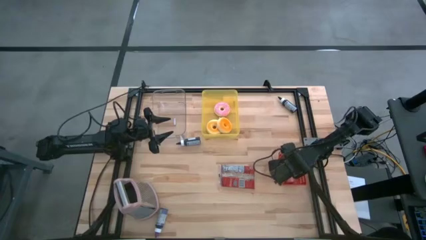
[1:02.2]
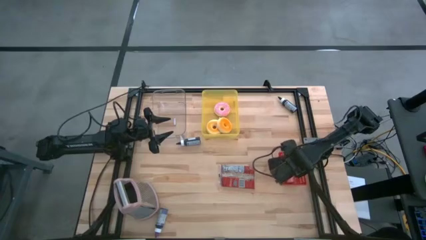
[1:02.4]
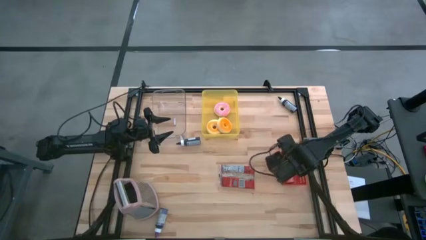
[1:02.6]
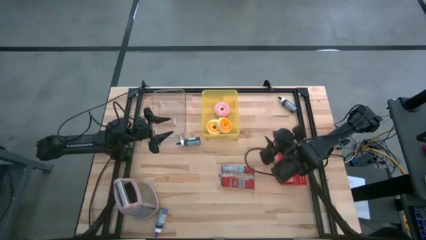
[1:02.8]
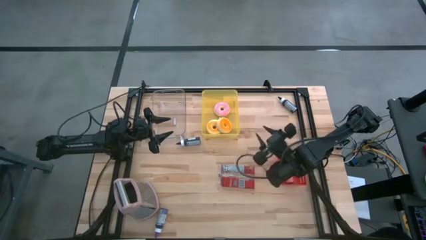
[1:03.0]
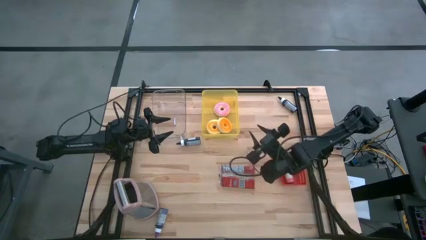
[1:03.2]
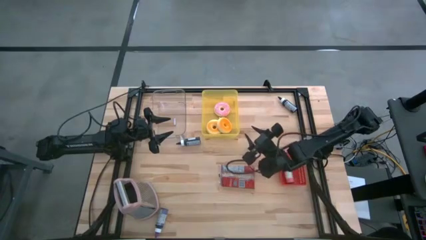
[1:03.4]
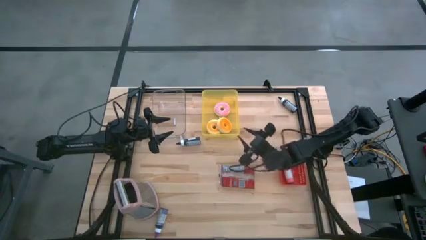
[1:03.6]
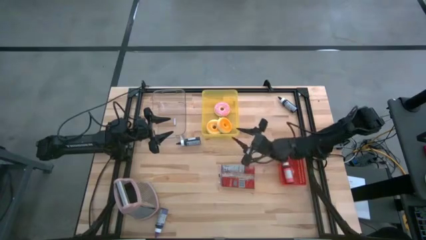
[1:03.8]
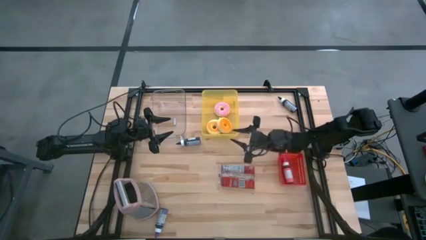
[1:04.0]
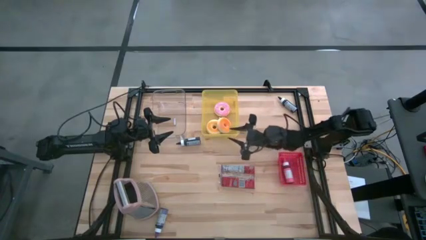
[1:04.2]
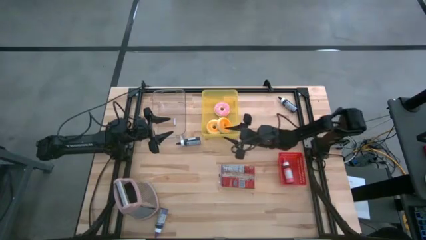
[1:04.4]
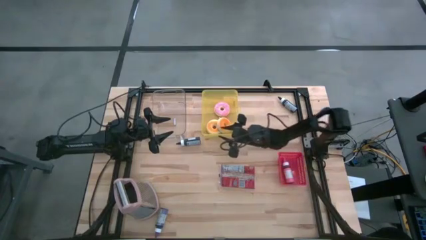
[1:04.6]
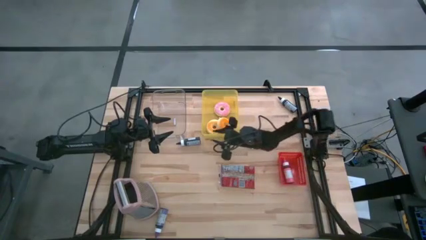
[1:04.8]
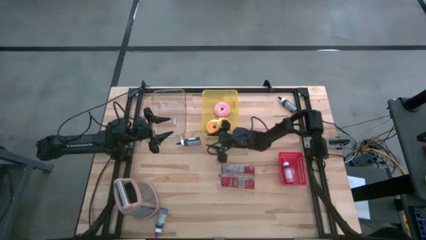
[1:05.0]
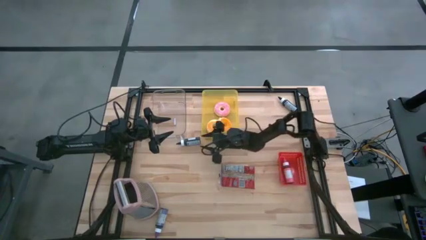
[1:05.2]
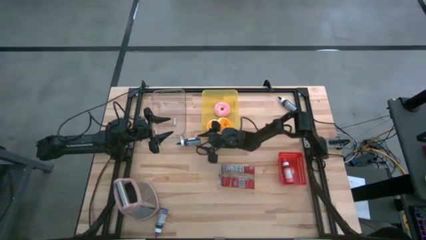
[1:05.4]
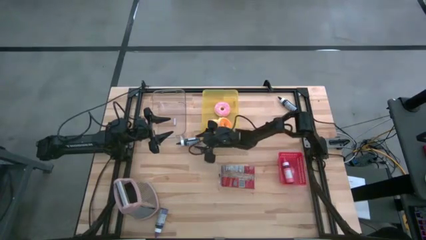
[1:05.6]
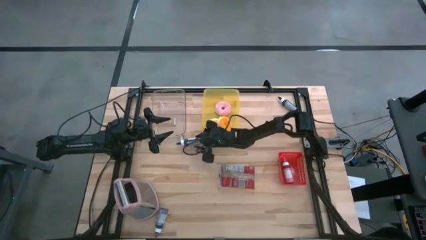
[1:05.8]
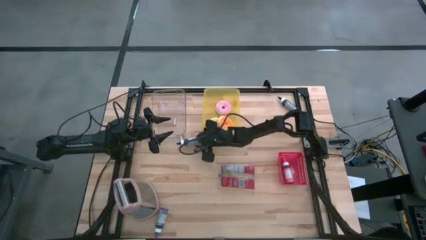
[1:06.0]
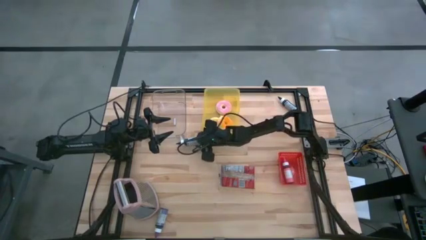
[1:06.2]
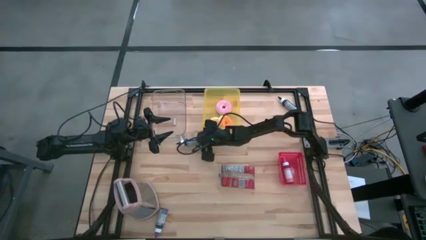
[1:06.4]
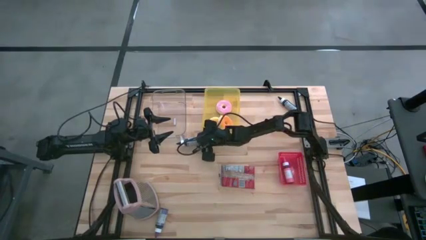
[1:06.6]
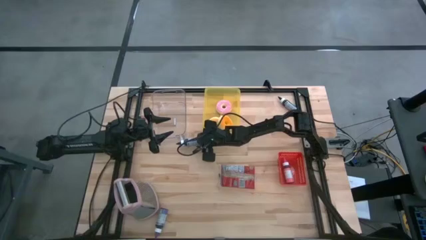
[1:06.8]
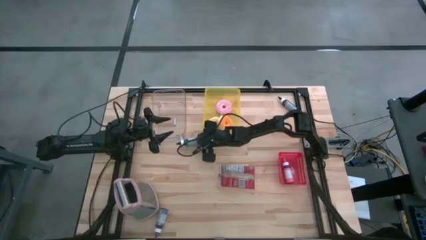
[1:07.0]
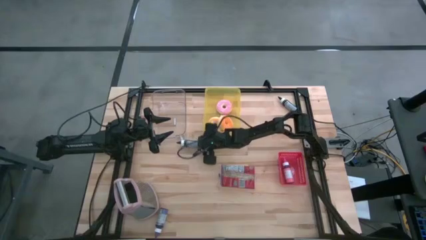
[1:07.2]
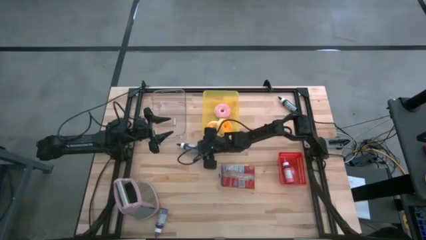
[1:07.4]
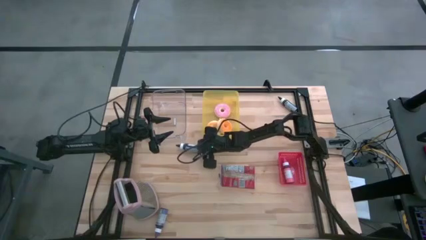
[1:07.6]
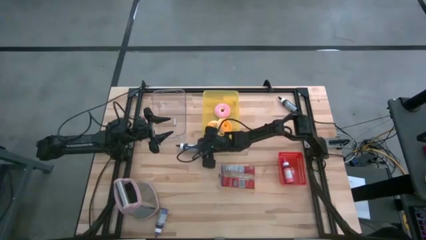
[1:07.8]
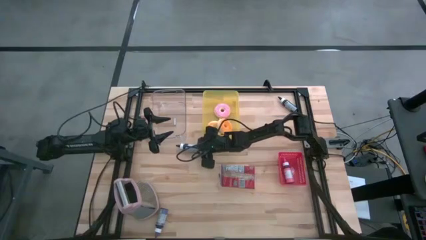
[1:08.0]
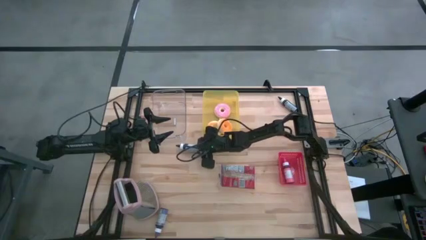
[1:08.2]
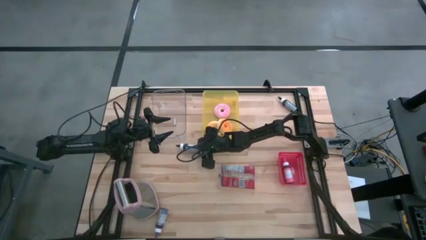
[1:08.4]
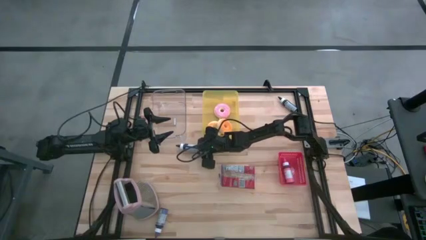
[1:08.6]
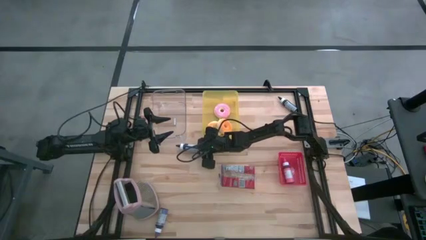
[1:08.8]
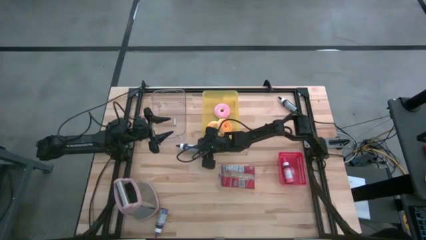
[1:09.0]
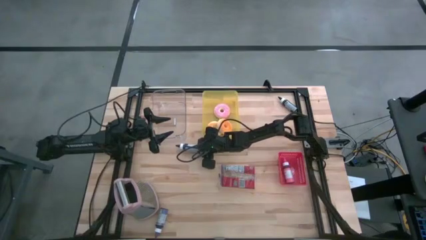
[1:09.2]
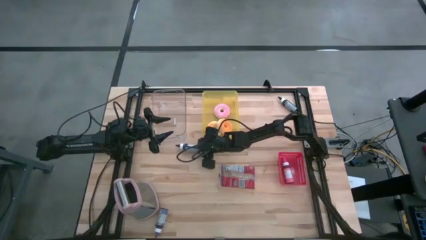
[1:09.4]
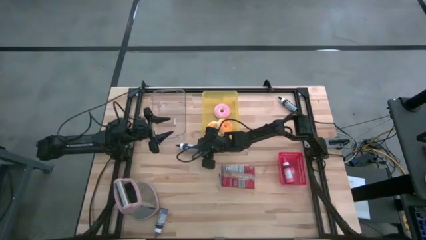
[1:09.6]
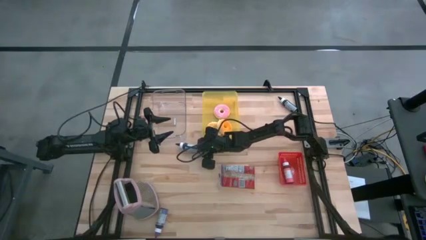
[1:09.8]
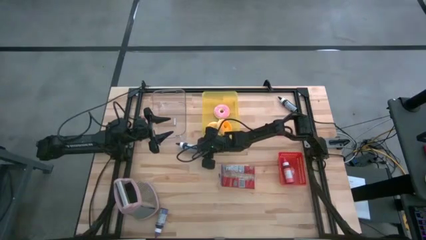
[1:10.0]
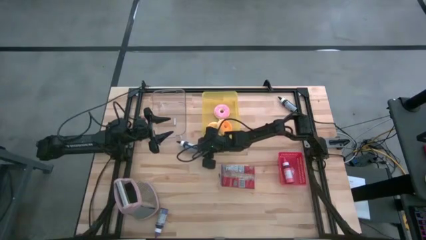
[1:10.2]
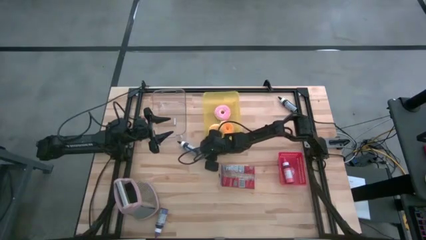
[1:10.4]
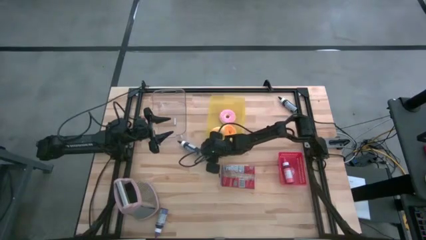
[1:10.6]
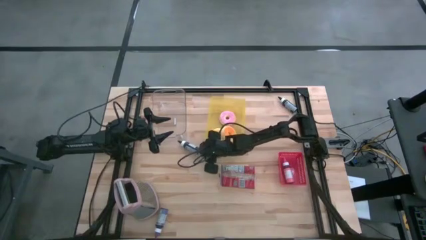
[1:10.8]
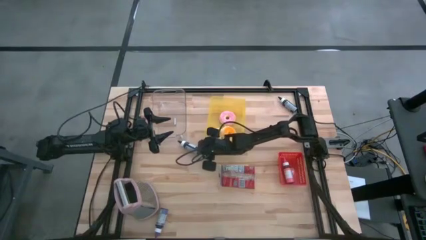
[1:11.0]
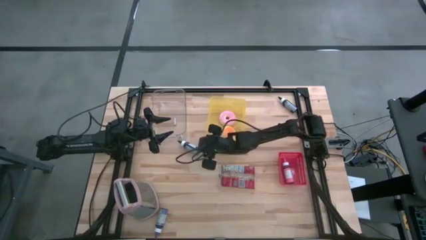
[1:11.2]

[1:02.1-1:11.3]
Task: Pick & Place Food Item
Put the left black food coloring bottle into the red bin

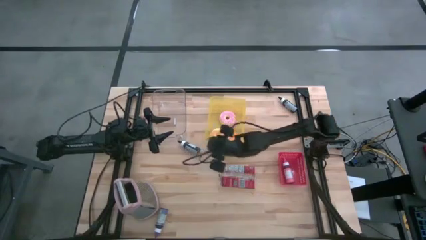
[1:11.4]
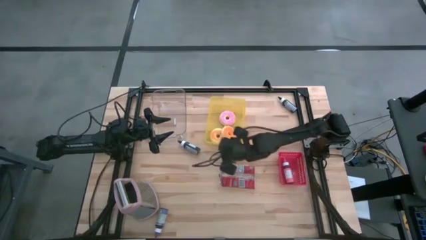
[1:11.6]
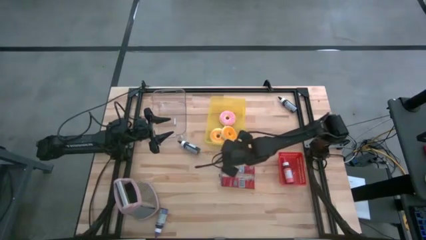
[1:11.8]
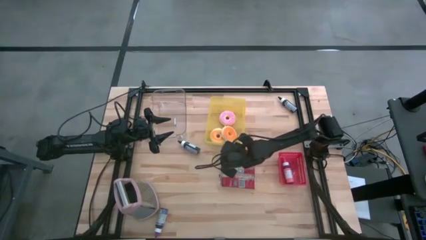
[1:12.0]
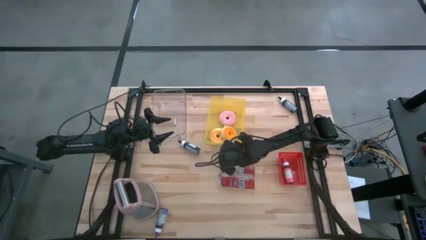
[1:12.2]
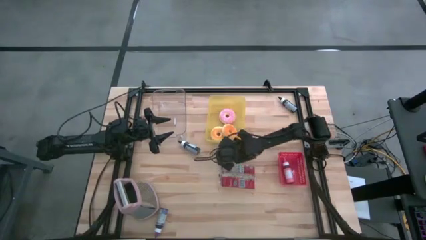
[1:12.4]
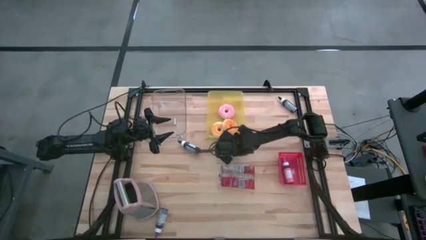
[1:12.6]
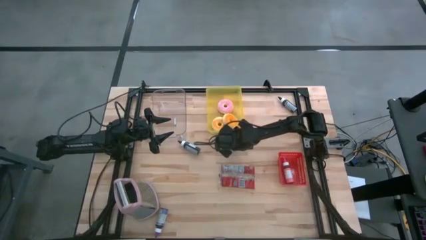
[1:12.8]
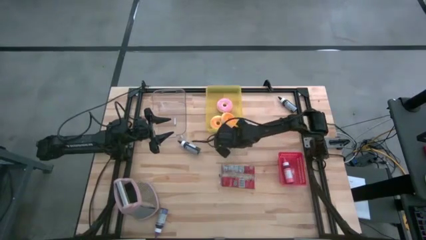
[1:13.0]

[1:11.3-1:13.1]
Adjust the yellow bin
